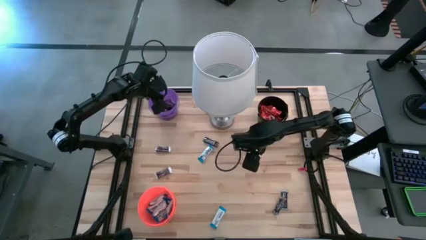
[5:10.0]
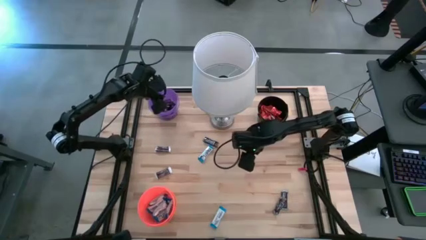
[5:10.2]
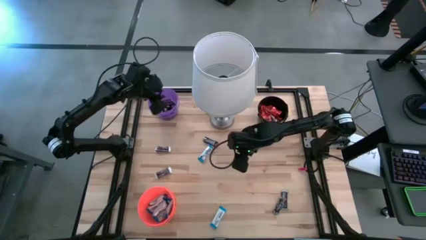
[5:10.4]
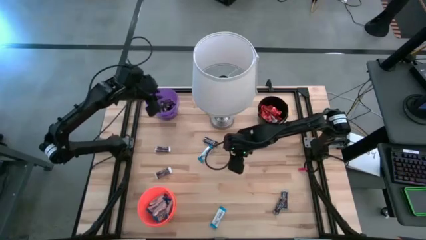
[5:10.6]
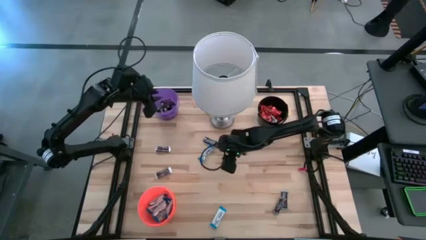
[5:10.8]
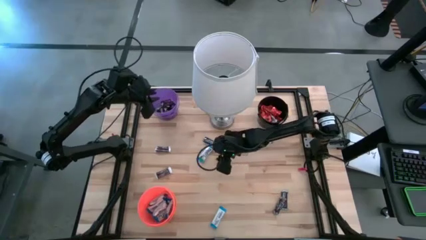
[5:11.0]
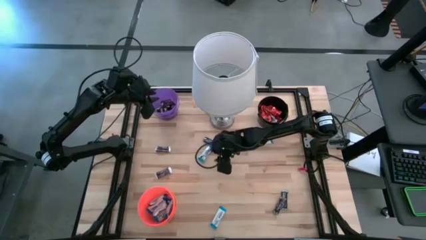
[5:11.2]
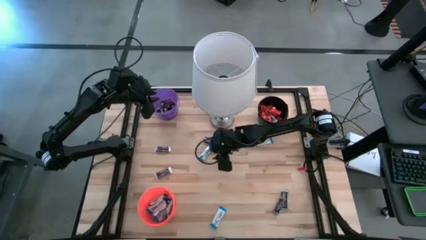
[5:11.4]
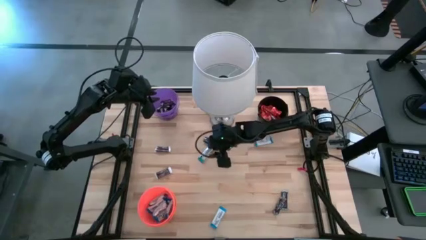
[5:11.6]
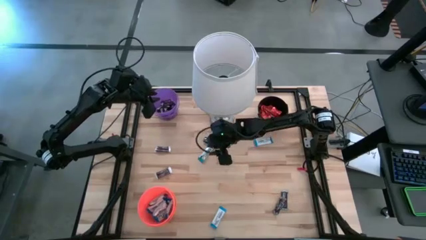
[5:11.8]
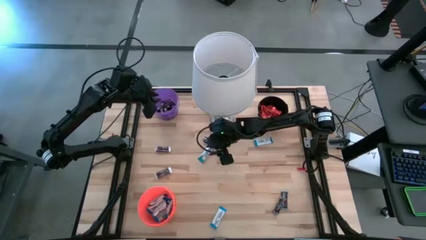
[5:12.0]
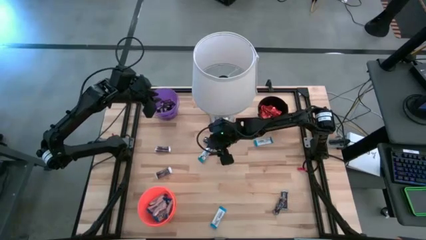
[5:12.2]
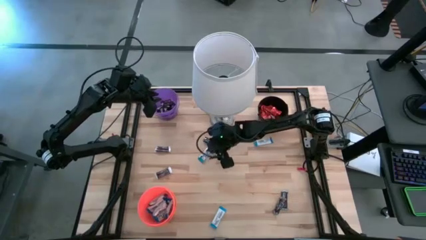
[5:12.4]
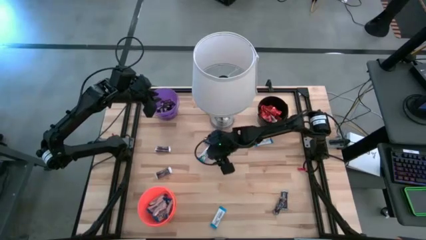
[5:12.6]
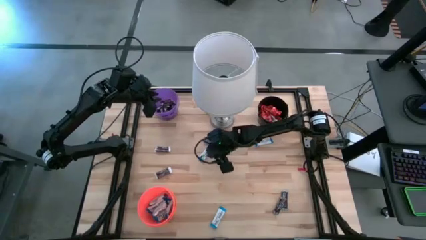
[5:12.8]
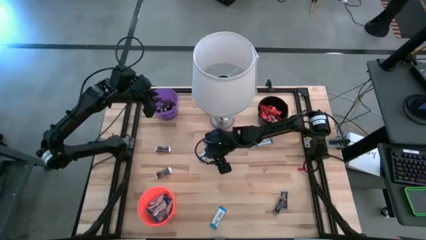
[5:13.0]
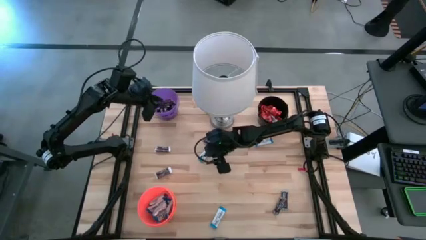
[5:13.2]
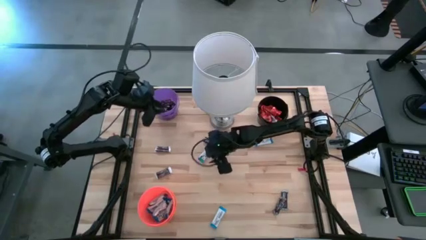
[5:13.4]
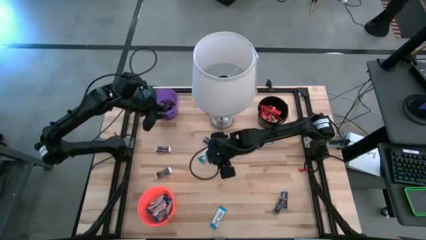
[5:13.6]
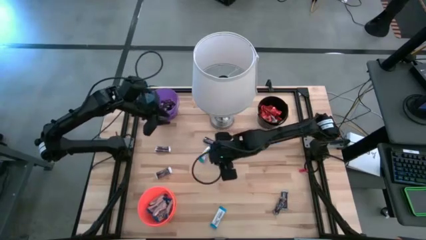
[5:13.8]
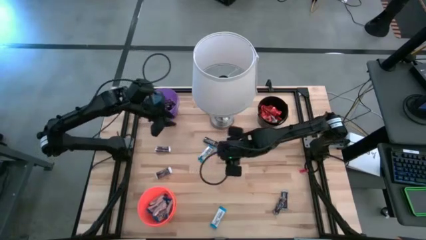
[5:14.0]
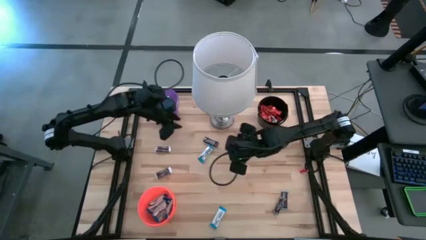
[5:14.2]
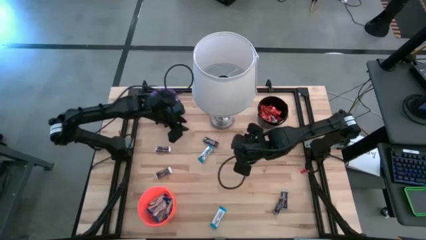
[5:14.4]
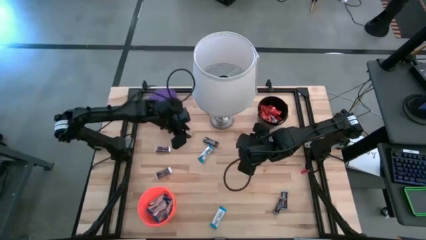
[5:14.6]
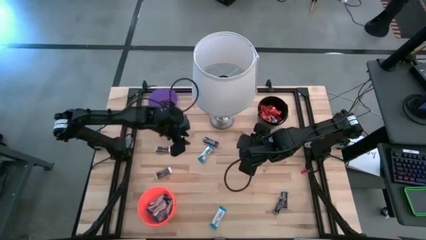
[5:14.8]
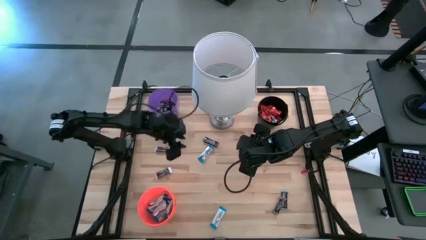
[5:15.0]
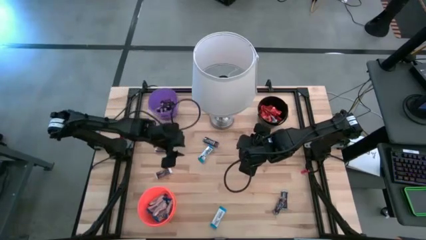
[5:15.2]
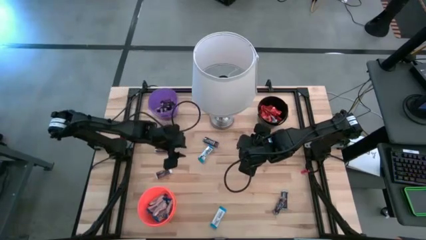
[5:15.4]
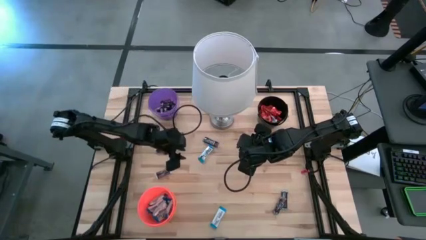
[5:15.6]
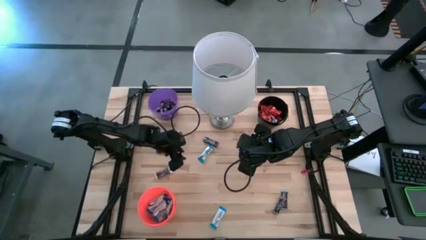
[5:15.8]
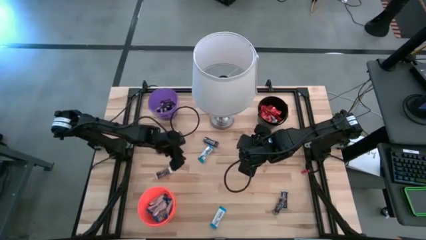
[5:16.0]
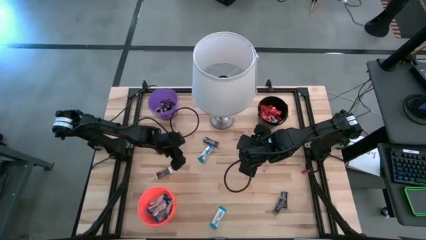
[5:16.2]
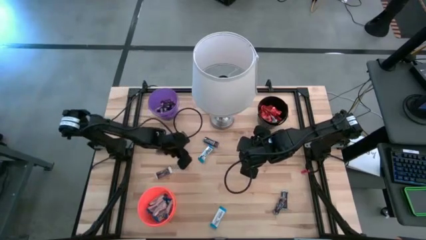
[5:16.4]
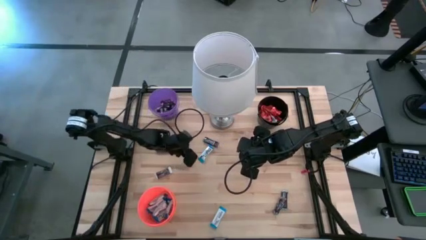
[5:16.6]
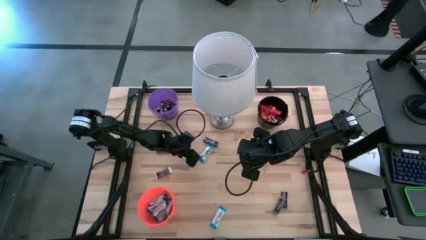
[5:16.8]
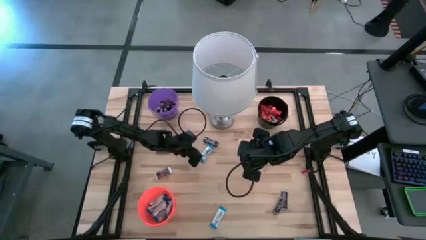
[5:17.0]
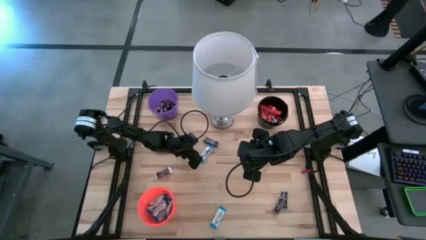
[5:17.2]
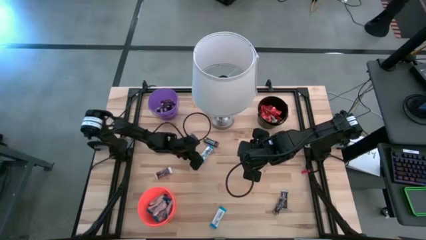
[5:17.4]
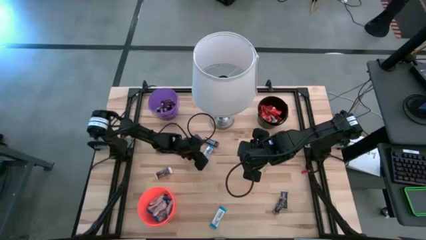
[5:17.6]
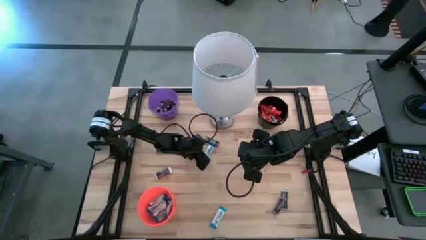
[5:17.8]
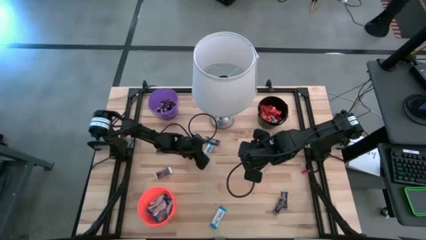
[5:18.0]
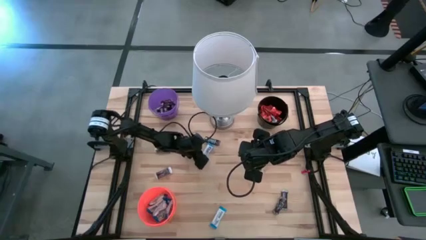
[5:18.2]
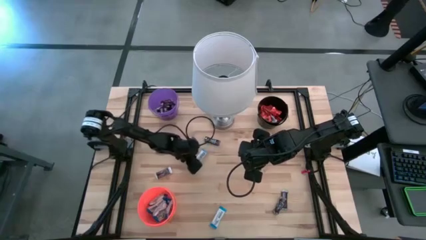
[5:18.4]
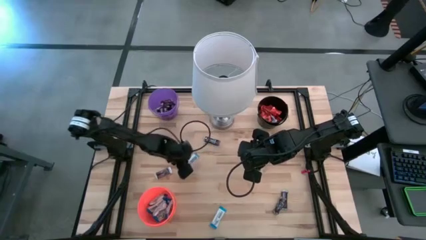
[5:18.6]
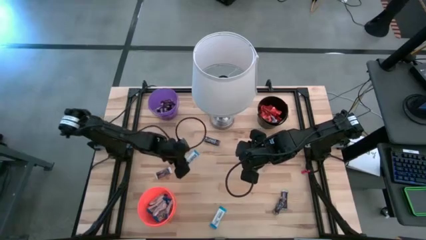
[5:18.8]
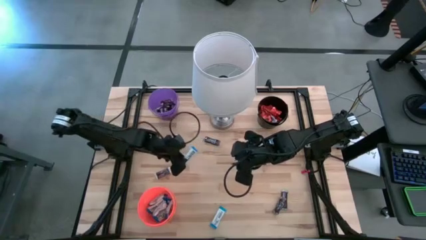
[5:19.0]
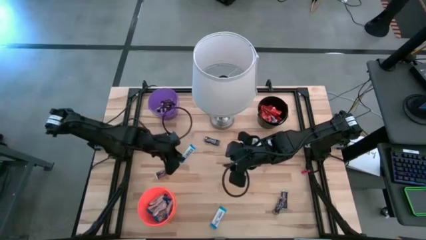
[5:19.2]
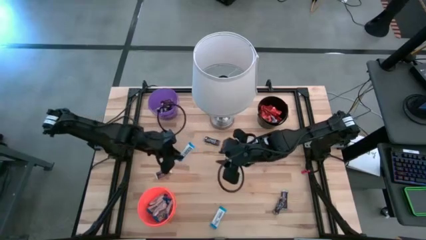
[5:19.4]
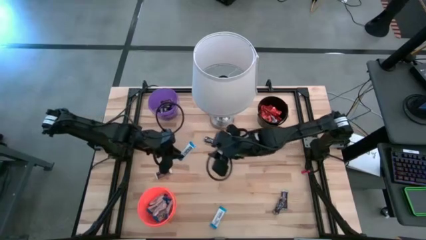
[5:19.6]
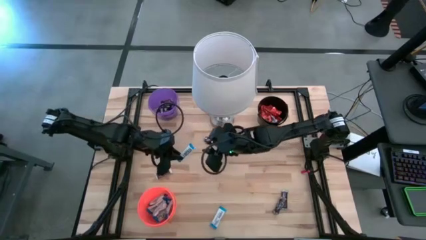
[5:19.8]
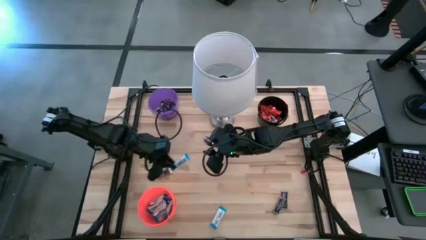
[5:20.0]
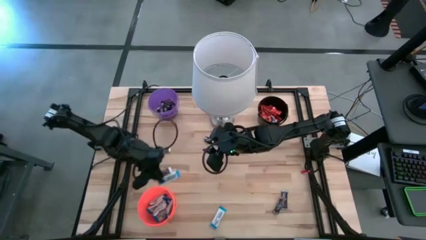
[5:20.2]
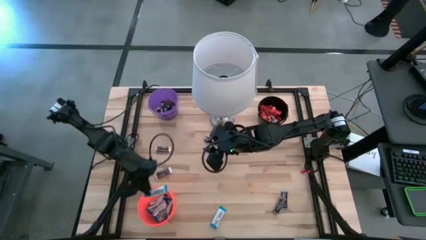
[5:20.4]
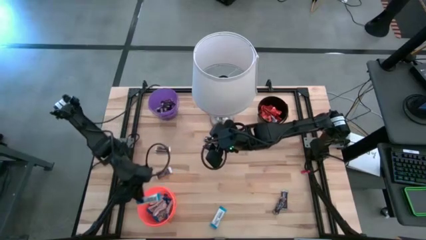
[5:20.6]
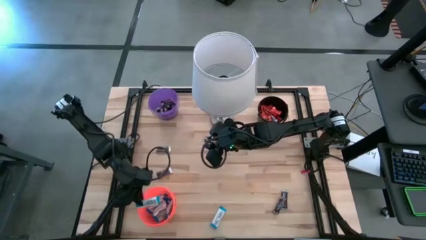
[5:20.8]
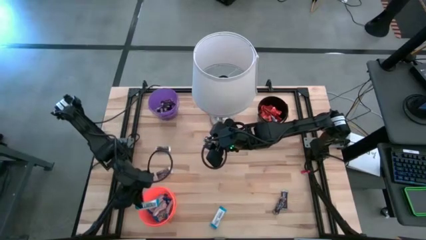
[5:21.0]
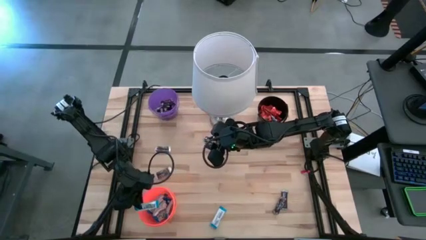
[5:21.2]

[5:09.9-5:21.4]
Task: Organize candy in baskets
Put the white chocolate bar into the orange bucket

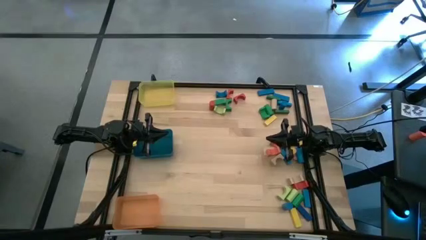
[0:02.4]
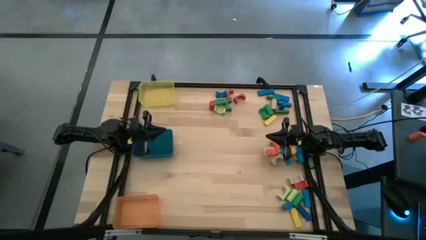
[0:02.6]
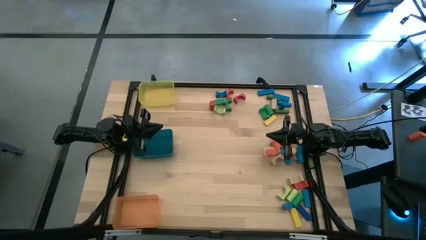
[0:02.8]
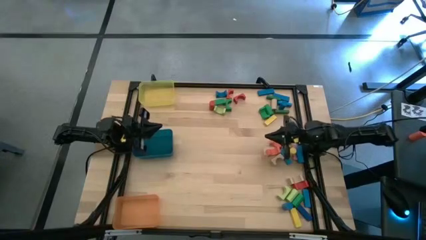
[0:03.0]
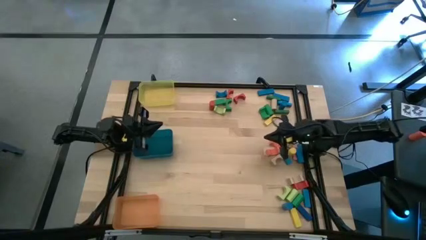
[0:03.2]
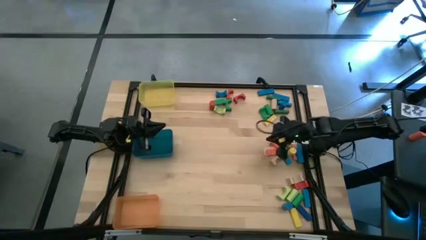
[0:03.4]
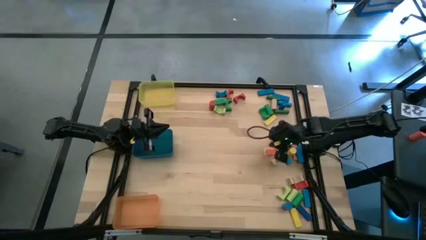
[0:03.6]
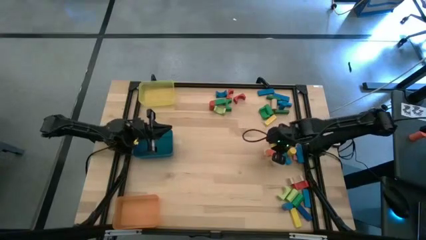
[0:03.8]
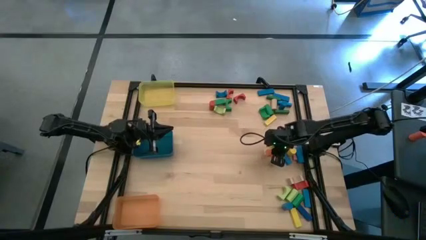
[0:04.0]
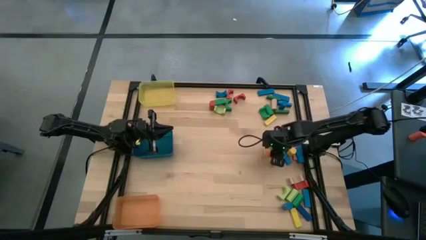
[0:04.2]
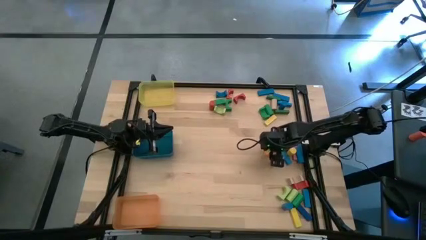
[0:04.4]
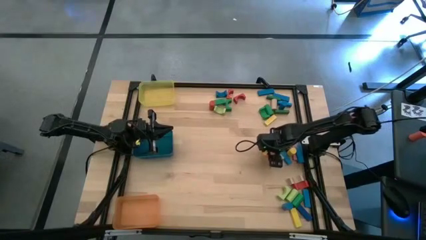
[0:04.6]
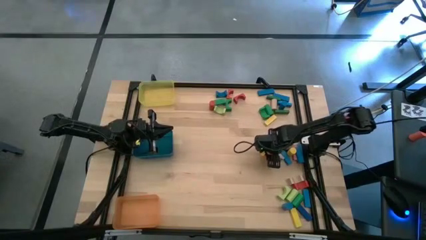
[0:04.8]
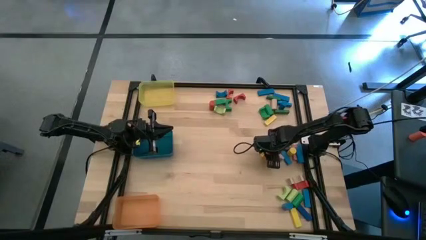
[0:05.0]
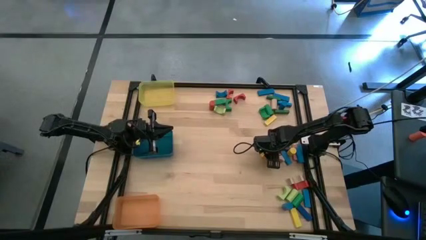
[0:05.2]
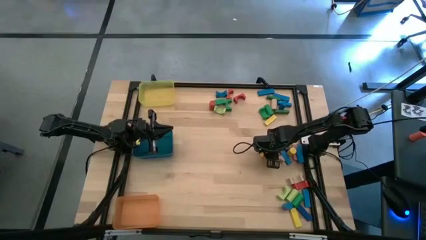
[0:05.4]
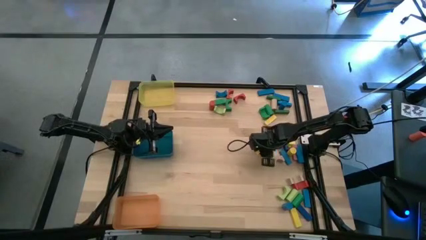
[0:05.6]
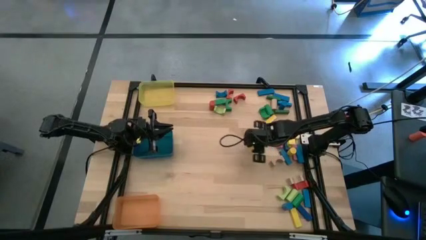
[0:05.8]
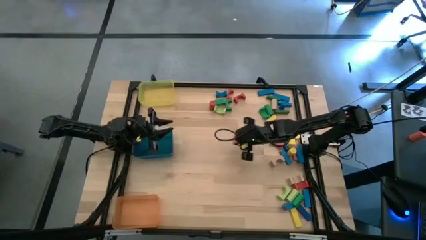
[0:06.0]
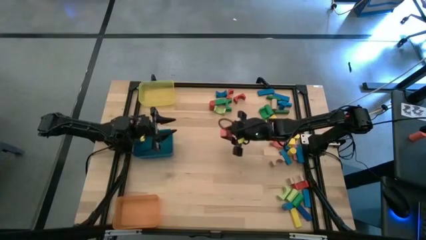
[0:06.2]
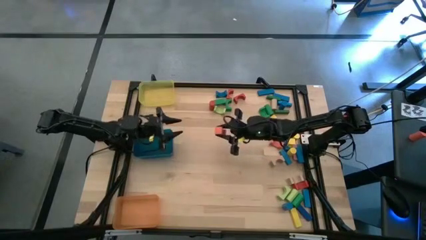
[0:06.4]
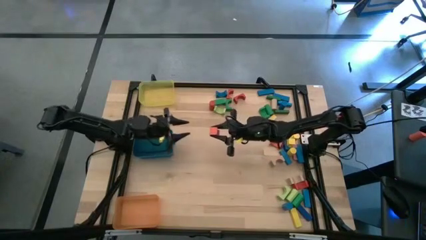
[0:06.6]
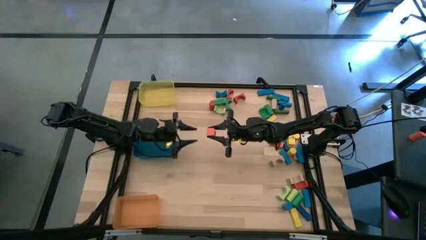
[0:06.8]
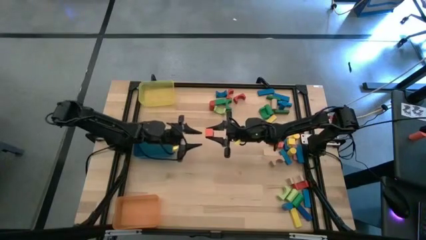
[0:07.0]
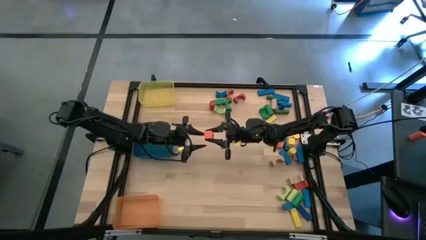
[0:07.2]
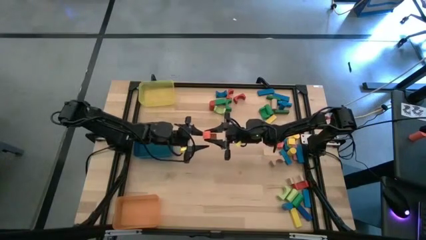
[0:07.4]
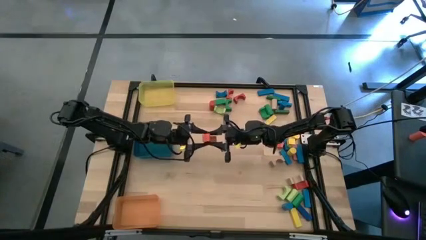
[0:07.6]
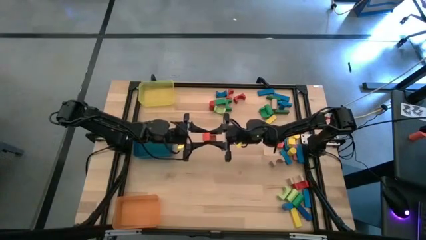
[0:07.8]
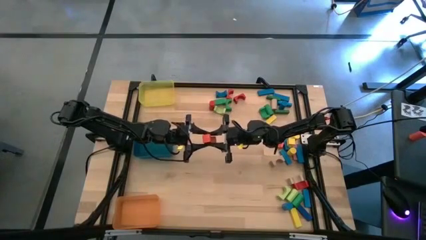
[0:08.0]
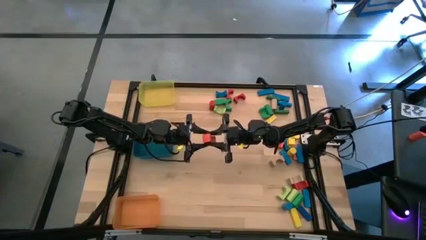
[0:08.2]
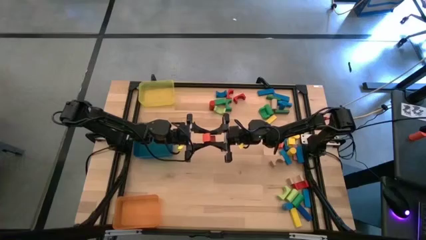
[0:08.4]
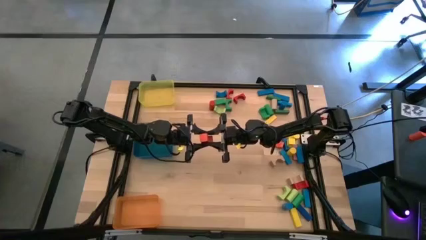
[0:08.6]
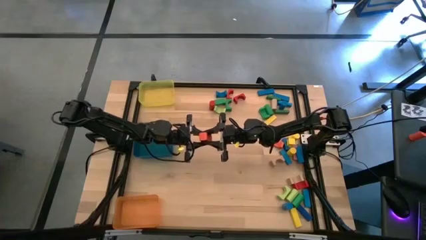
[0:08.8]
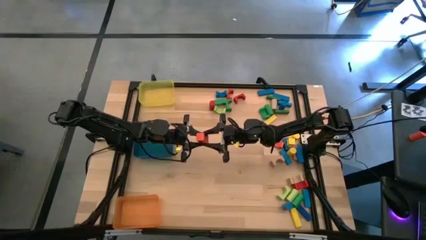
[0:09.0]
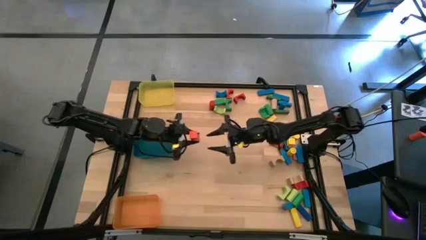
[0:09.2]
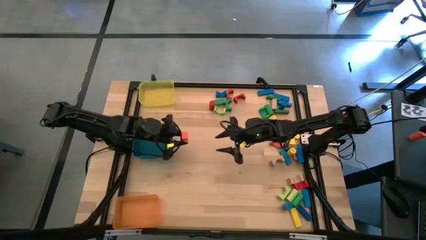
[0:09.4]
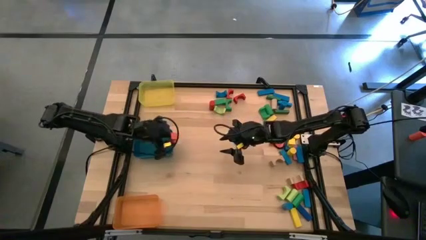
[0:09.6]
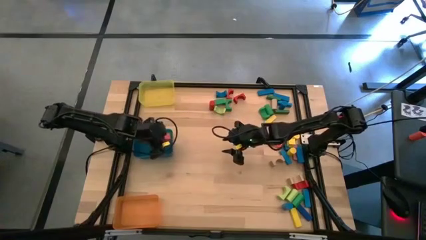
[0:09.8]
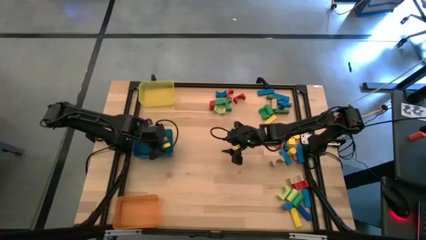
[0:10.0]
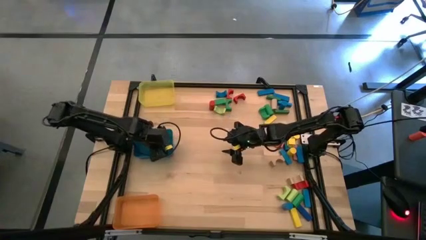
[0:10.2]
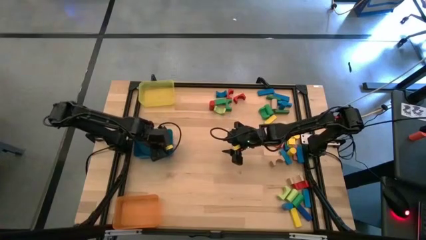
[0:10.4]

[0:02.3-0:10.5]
Task: Sort blocks by size
Put the orange arch block into the blue bin
